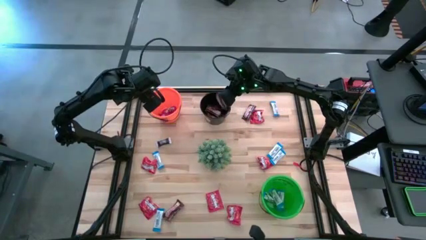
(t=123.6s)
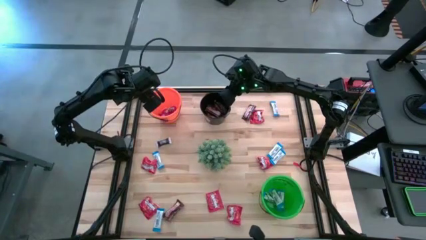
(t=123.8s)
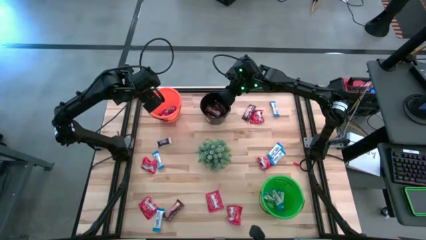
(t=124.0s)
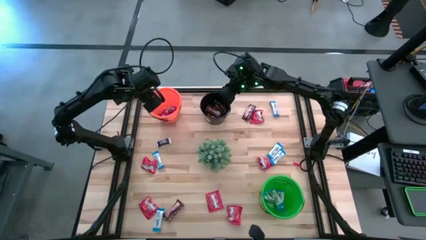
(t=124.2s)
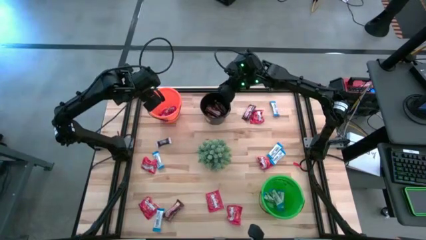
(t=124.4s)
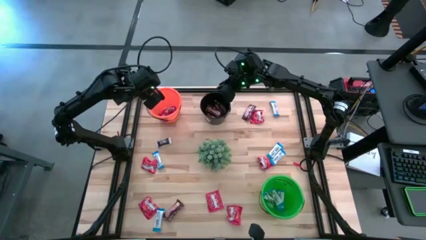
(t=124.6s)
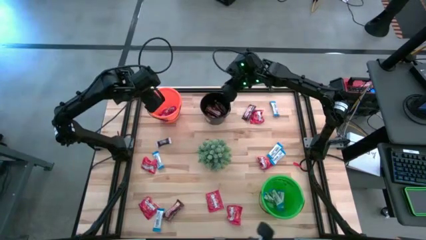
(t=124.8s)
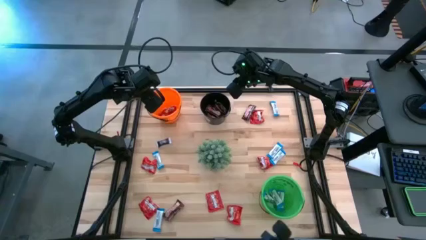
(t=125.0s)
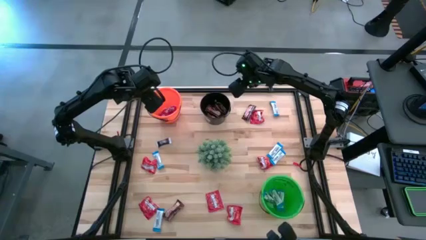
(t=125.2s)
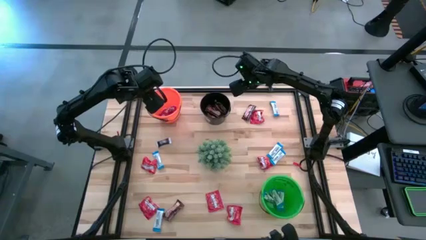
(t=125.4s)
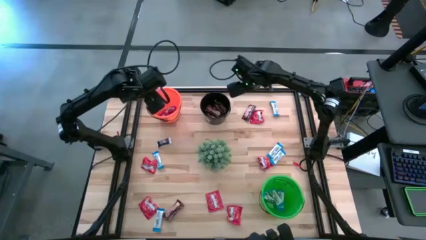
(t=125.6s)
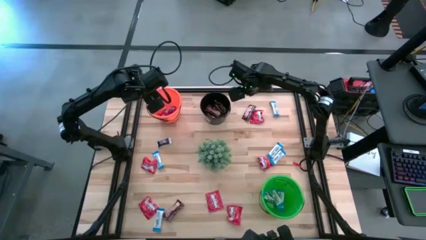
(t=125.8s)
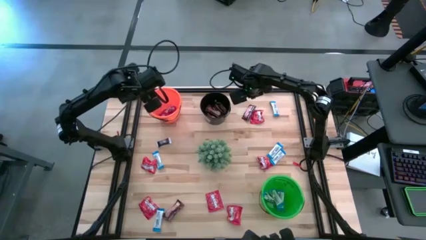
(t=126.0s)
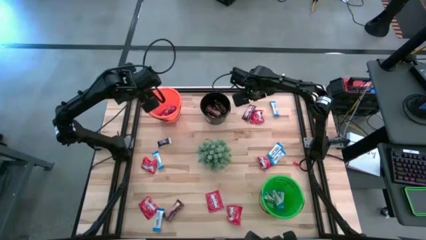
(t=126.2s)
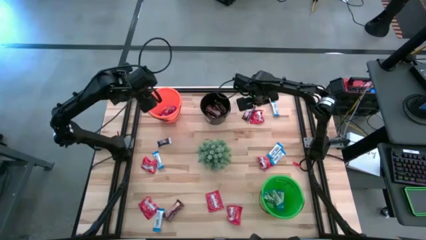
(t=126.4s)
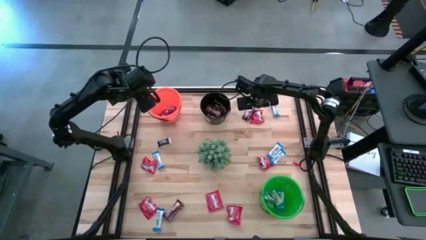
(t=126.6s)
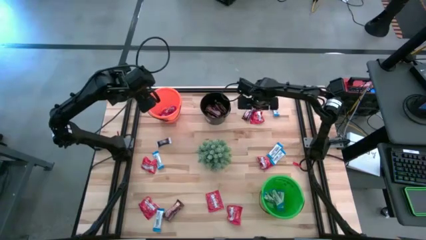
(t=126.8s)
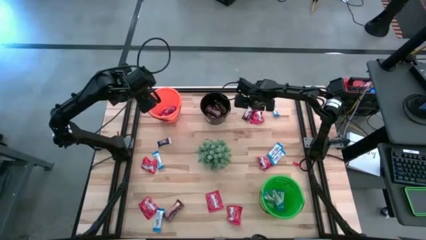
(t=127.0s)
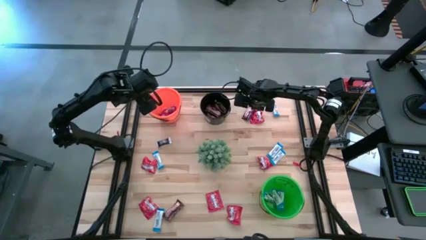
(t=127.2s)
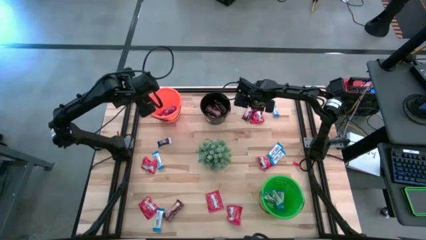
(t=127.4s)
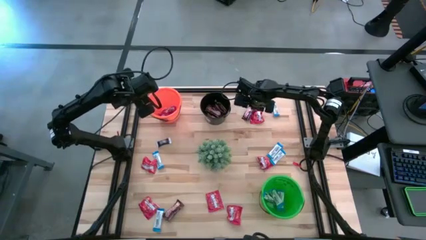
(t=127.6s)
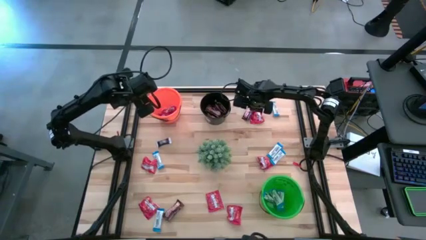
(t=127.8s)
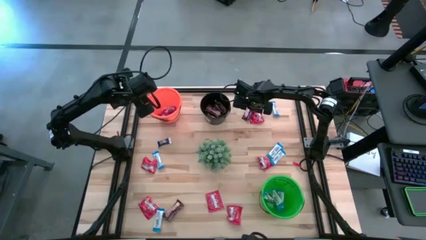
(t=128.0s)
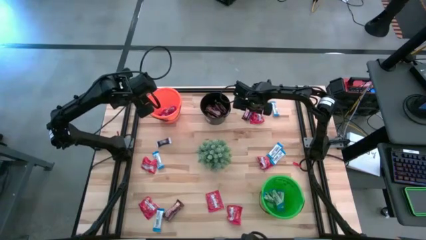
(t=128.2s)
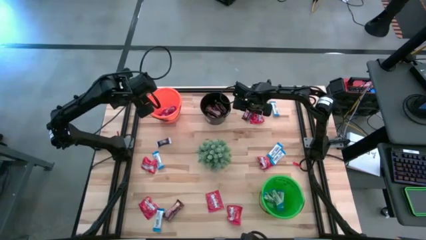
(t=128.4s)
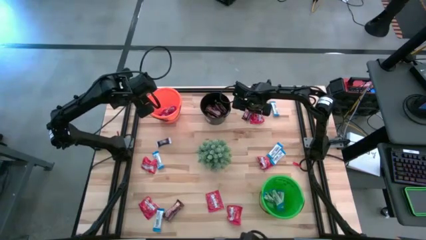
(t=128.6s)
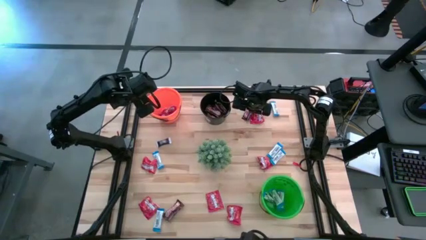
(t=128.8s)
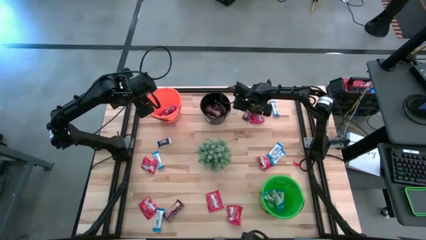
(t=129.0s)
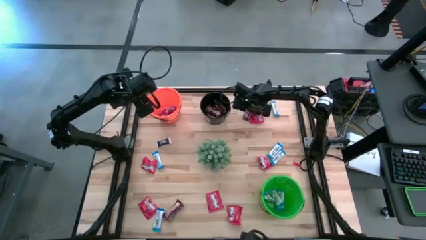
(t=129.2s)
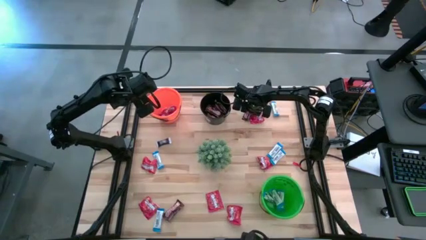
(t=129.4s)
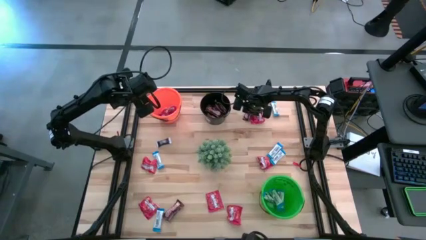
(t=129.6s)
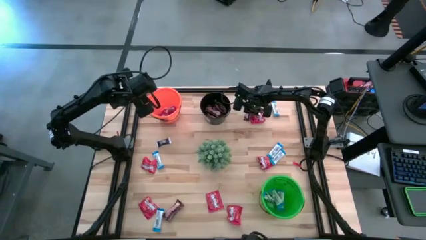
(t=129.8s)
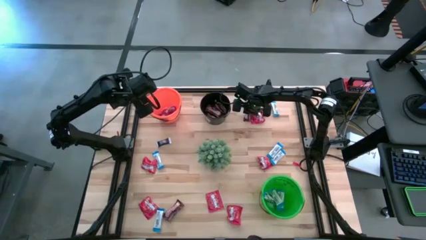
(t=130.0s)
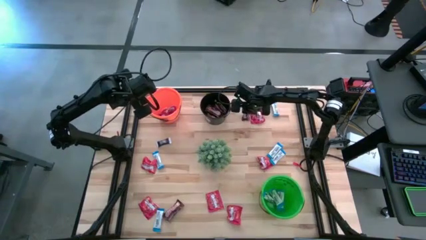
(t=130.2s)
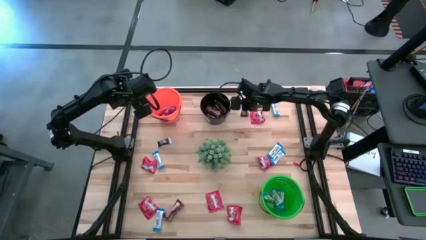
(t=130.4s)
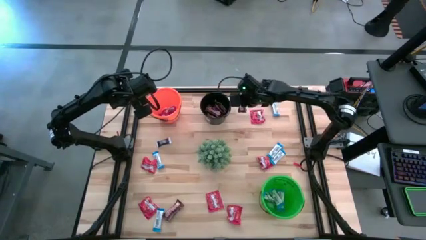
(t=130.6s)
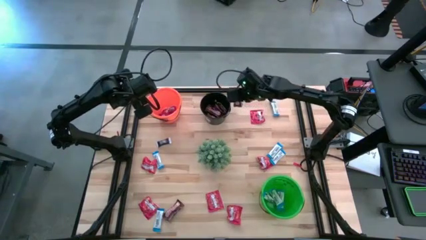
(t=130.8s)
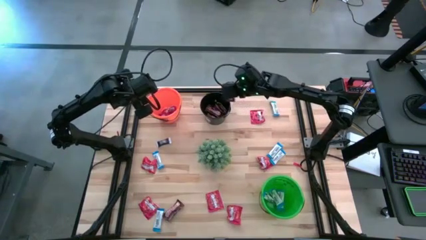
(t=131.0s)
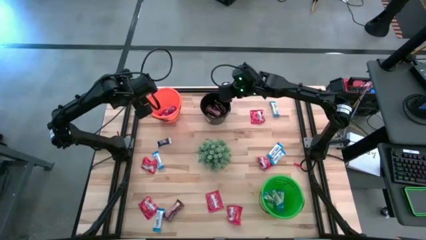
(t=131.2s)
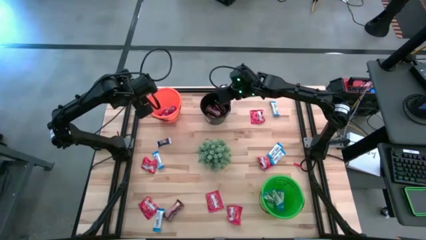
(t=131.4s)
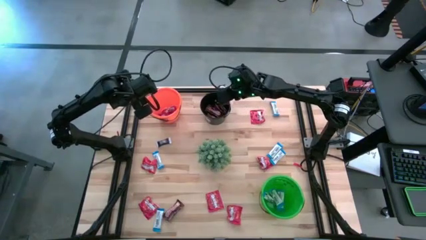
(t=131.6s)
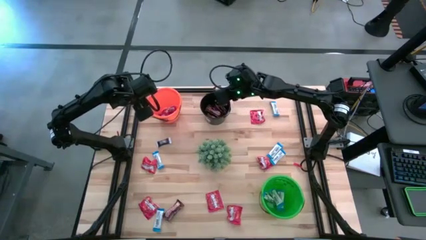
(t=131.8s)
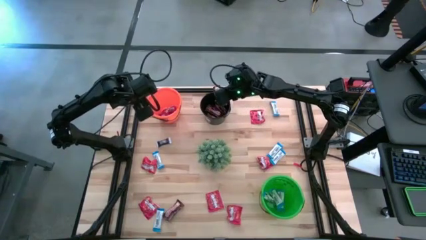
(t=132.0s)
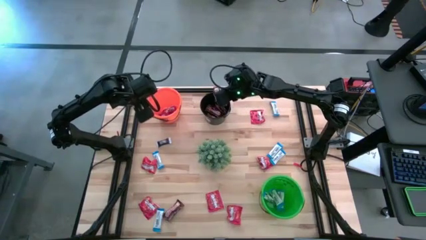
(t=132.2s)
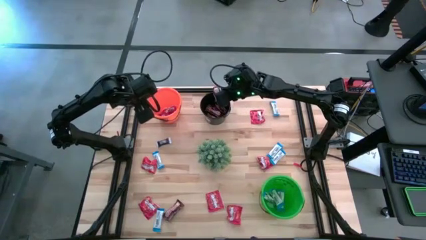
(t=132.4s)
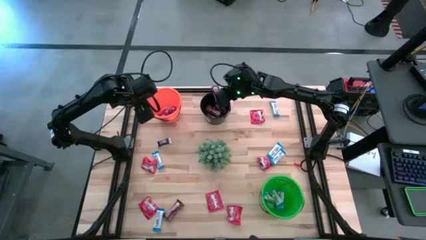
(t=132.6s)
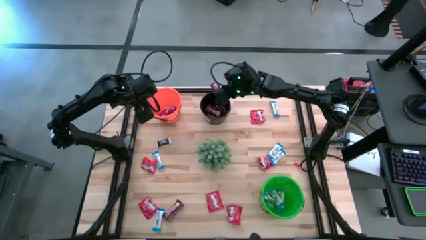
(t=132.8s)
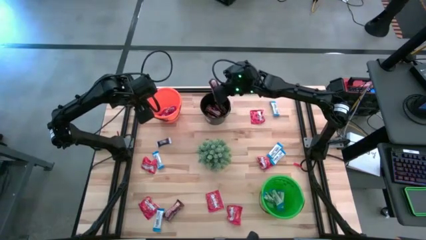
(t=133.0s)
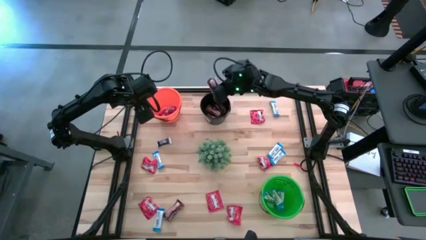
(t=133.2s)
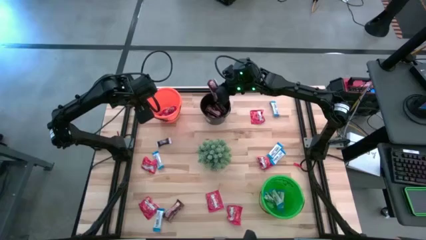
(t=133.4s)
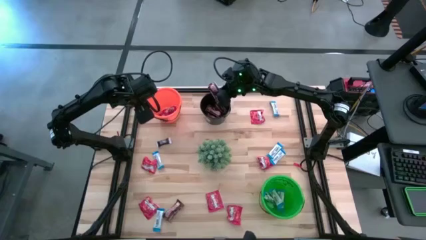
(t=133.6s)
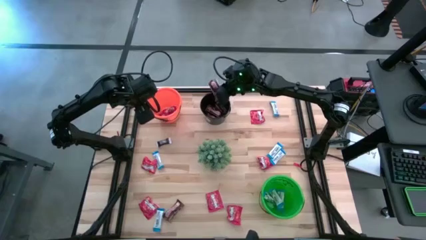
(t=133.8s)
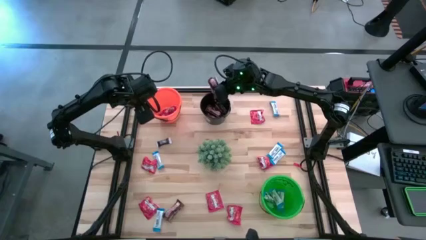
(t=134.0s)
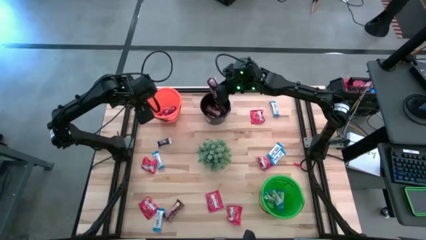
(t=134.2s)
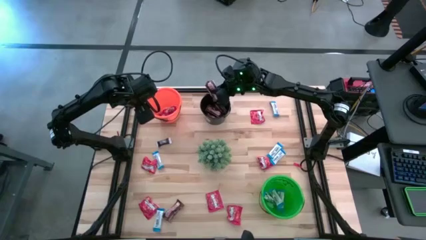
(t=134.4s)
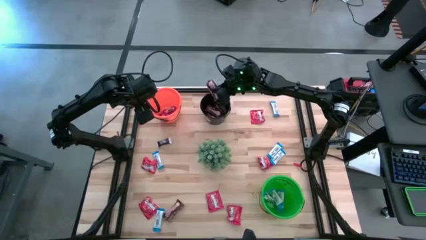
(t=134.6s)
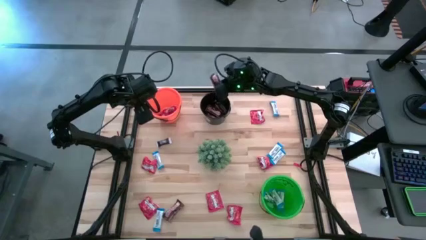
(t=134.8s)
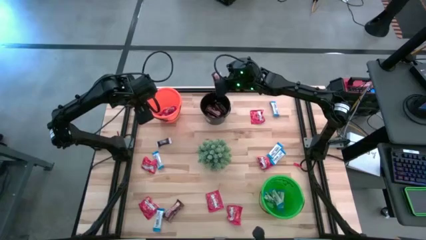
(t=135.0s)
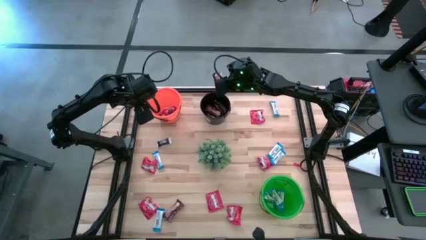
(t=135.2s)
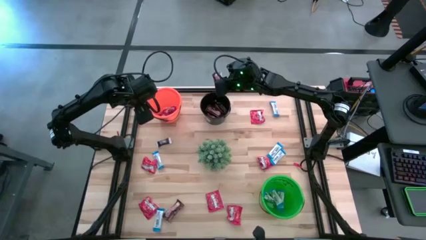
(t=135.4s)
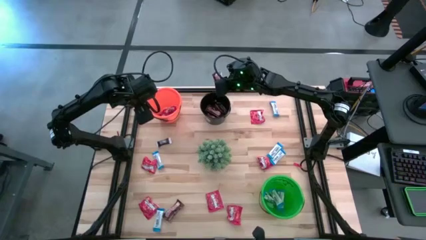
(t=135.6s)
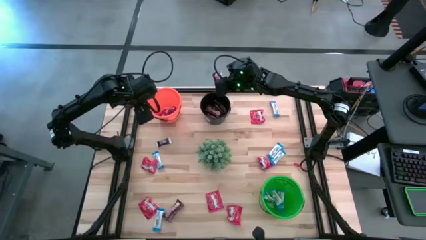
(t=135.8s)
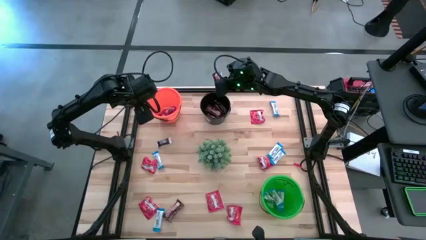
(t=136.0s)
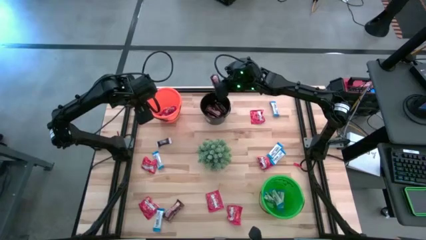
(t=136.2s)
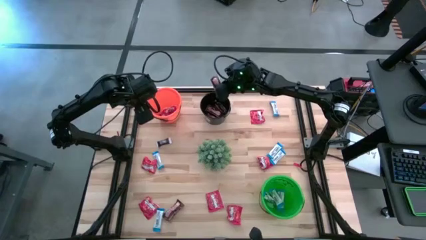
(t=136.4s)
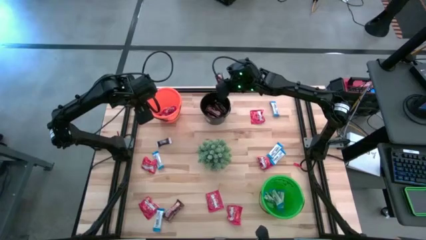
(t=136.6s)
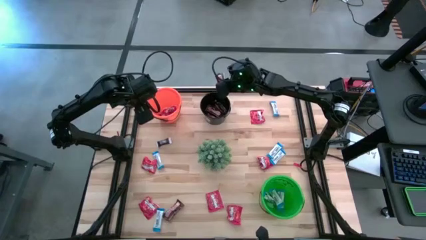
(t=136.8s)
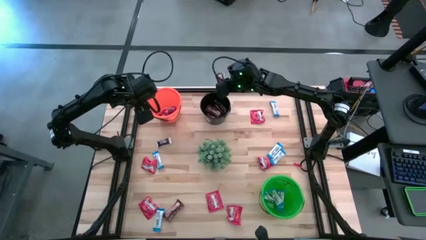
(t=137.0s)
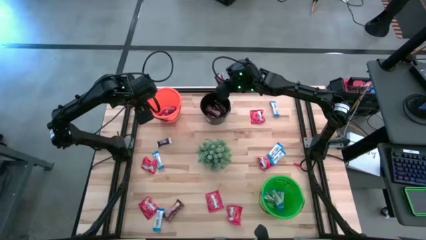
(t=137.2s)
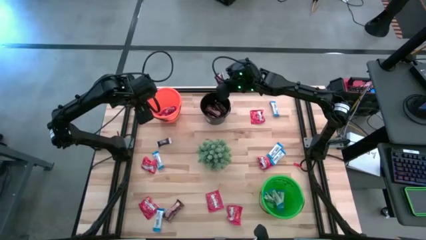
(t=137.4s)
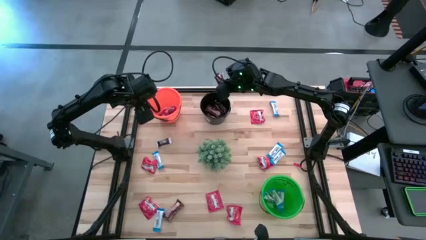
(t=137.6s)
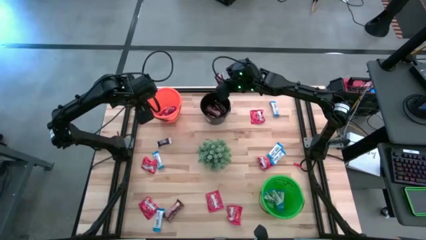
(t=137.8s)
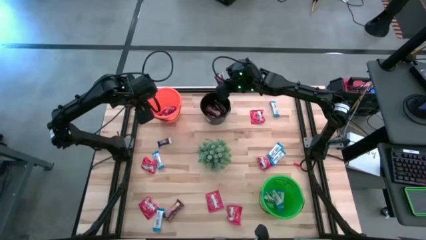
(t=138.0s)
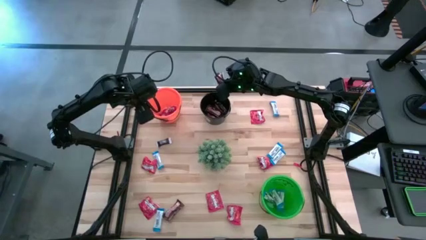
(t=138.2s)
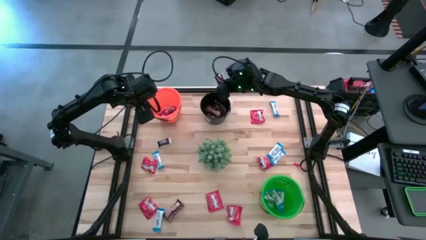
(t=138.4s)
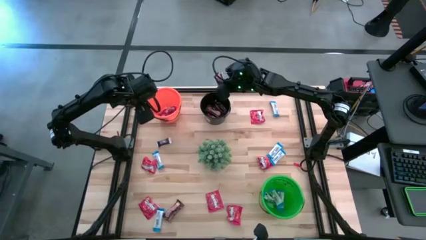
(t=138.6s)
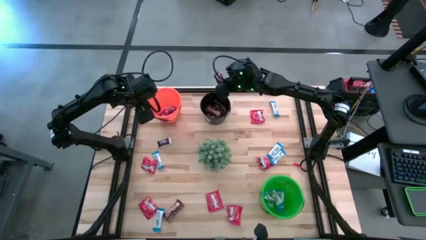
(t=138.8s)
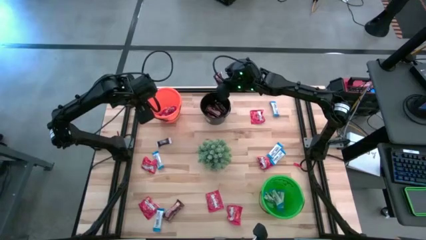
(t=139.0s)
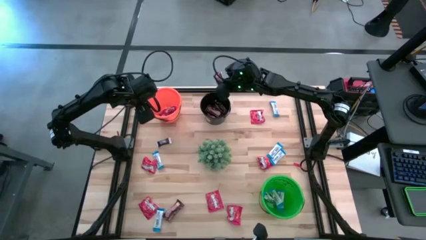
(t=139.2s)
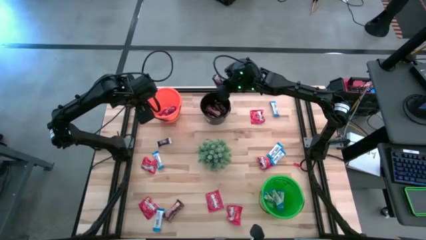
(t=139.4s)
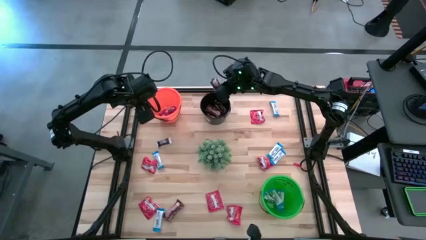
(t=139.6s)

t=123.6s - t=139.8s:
Task: Sort candy
Put the brown chocolate into the black bucket
